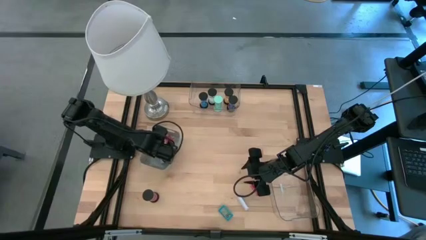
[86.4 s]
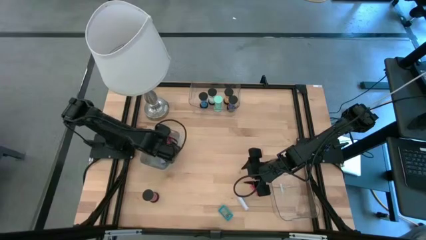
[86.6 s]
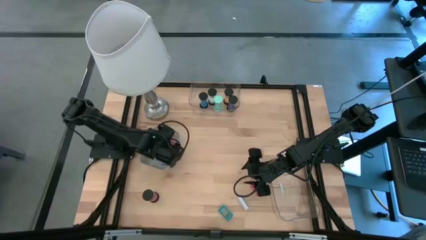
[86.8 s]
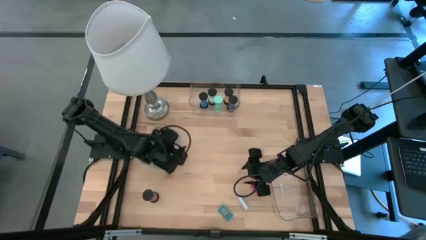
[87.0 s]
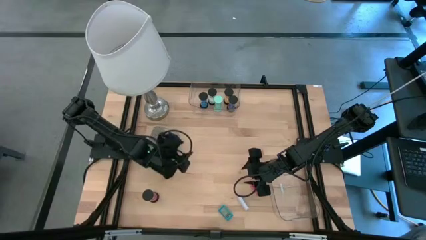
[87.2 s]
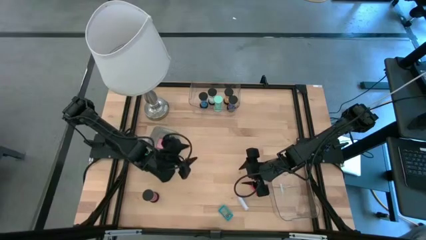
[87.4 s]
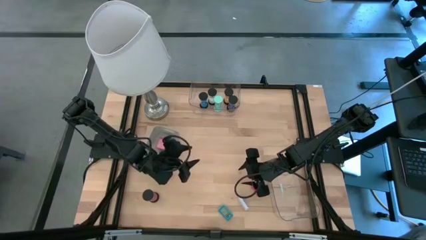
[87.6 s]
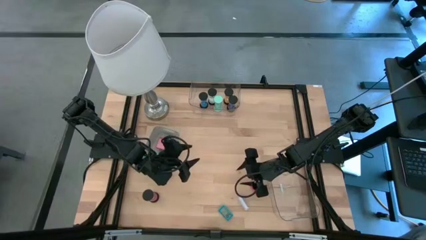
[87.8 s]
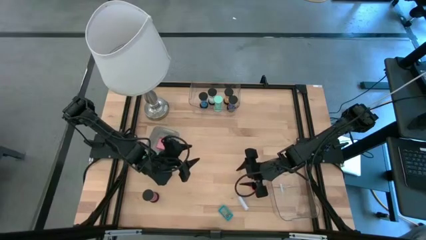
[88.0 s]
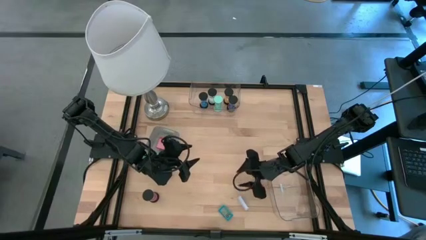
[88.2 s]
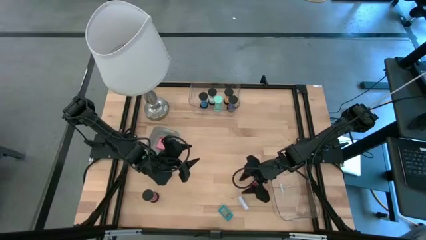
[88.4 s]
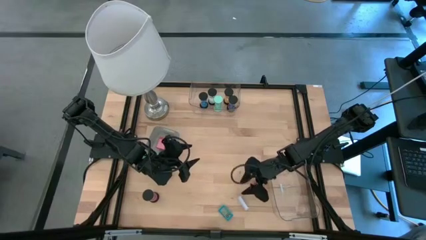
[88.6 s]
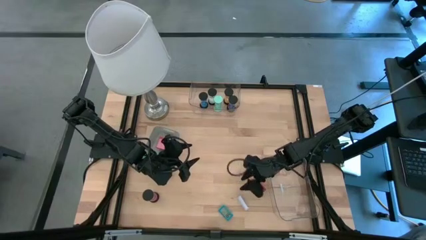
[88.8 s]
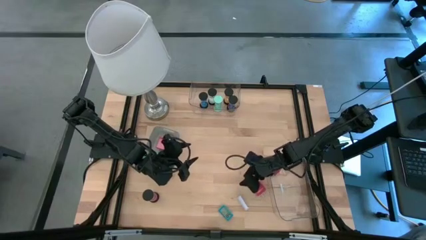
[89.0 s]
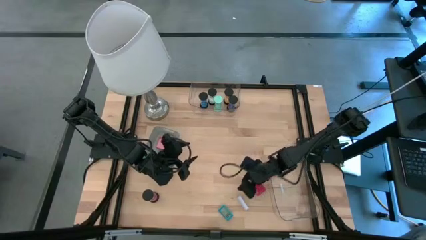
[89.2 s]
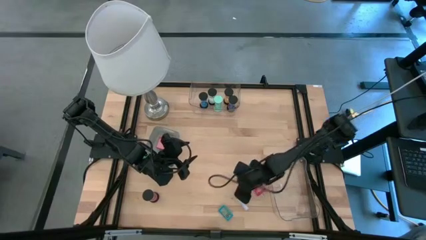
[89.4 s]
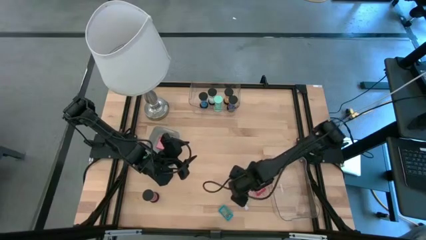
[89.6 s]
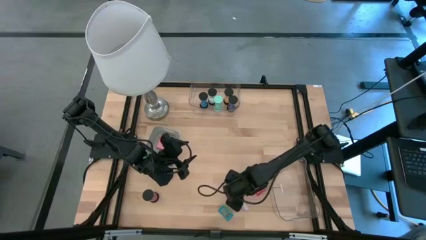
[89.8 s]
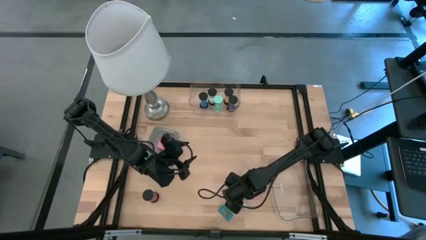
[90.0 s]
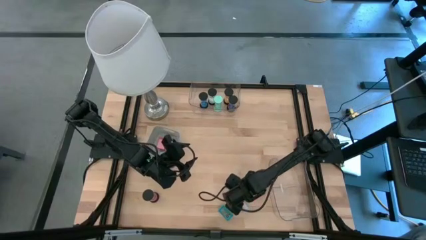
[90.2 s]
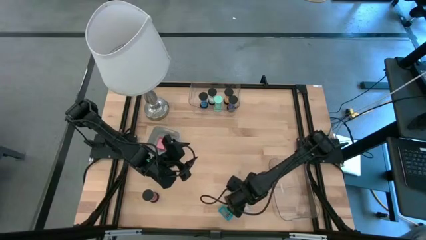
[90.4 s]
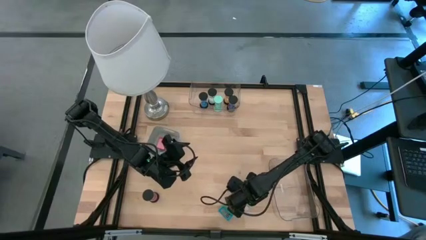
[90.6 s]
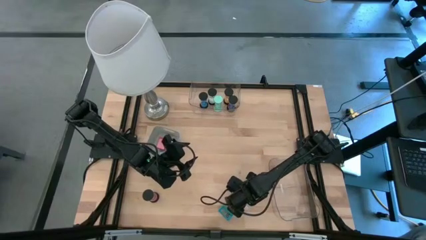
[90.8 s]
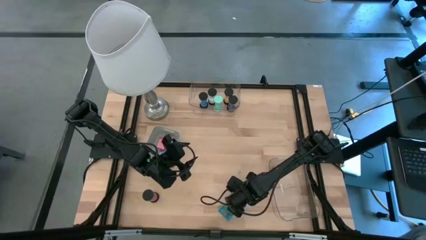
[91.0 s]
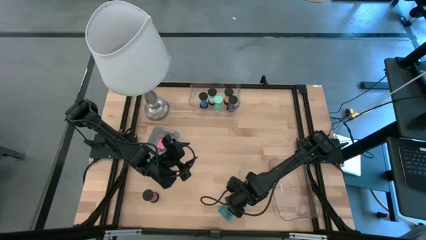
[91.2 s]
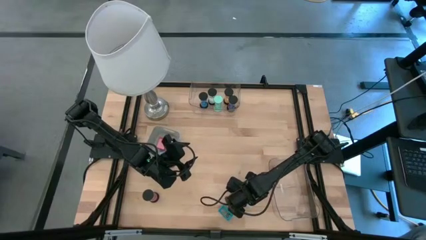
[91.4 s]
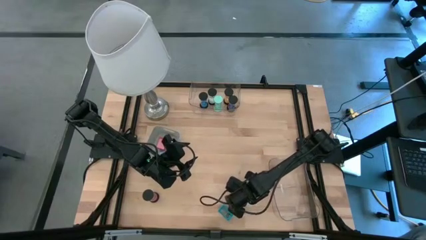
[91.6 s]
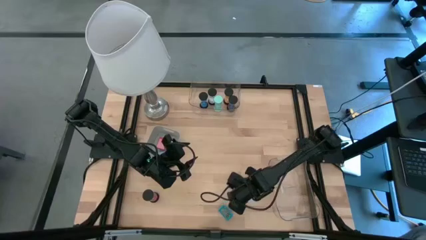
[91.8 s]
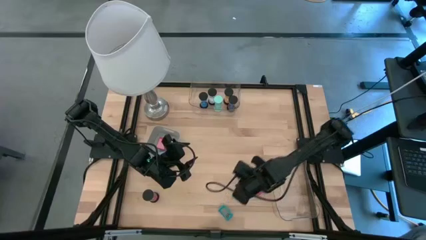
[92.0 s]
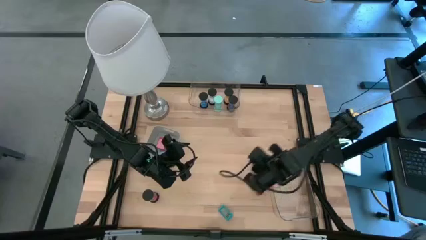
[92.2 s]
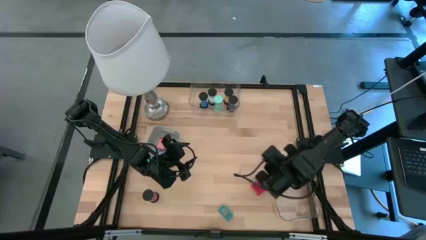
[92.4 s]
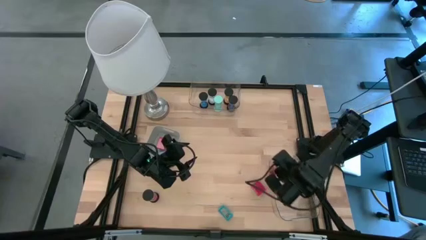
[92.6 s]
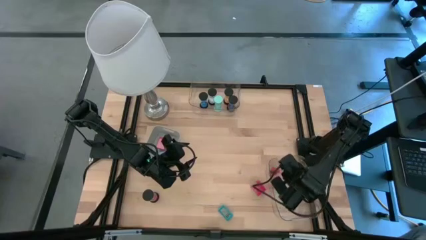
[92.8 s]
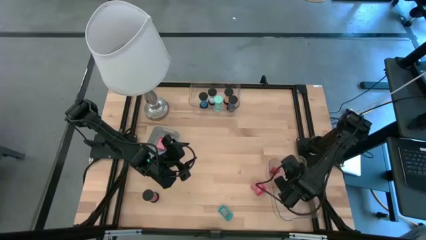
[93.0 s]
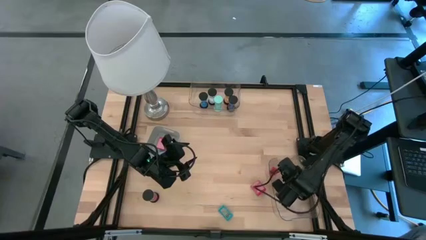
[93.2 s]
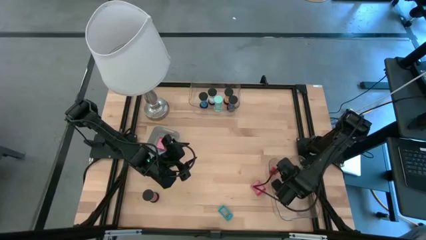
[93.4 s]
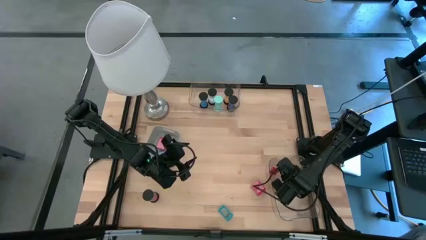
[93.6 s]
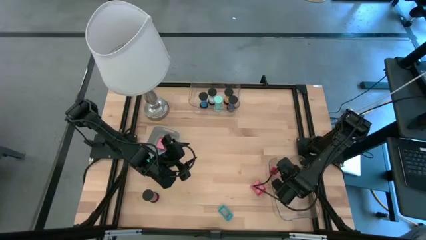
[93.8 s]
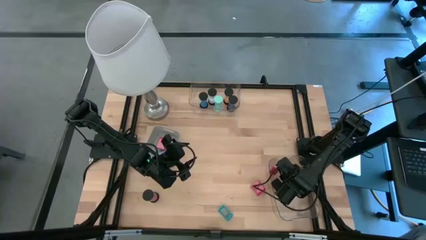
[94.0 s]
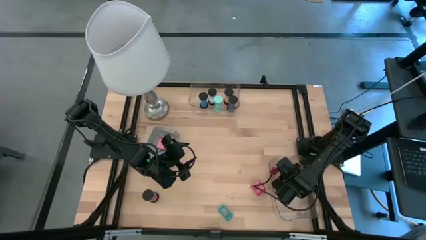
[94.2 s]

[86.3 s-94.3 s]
Task: Pick & Place Office items
Put the white digital timer into the bottom transparent bin

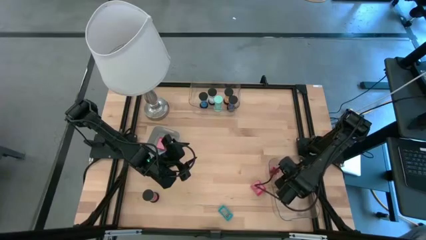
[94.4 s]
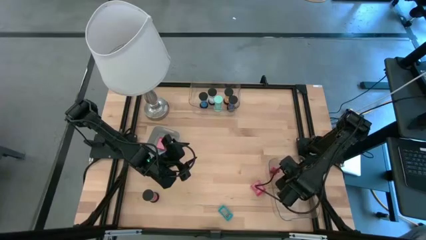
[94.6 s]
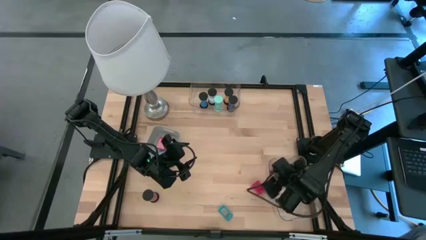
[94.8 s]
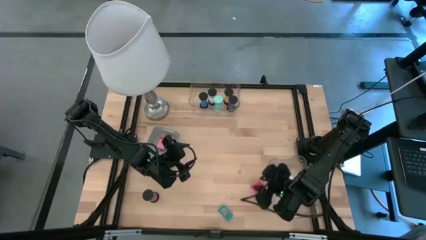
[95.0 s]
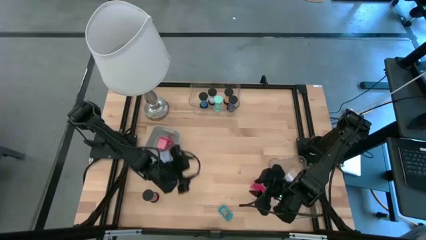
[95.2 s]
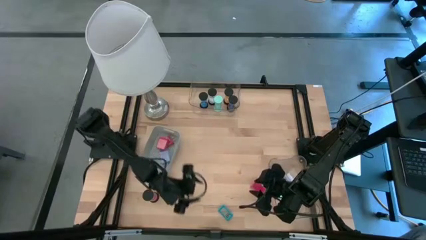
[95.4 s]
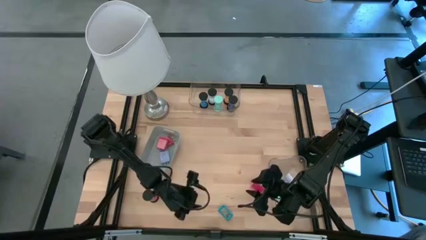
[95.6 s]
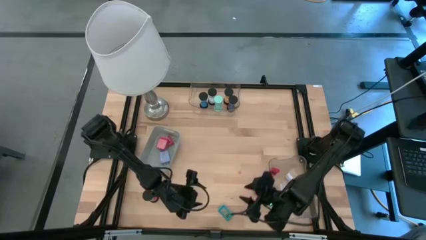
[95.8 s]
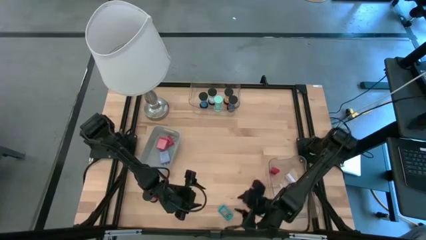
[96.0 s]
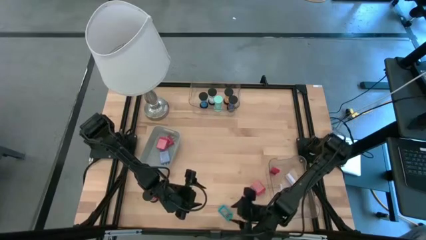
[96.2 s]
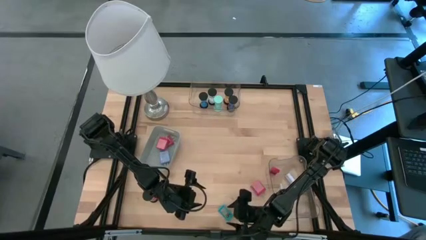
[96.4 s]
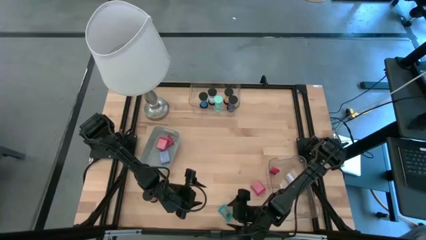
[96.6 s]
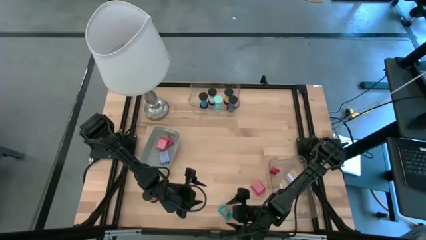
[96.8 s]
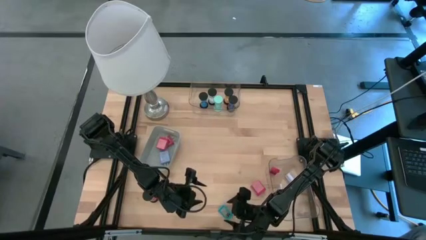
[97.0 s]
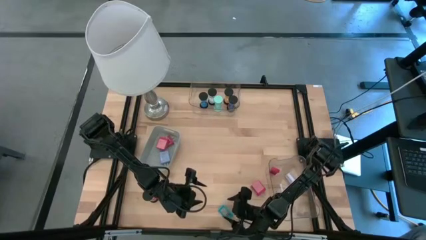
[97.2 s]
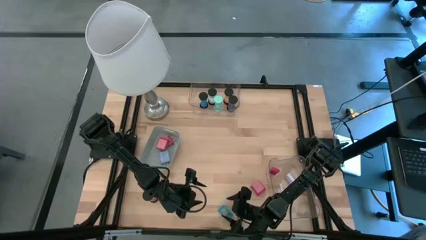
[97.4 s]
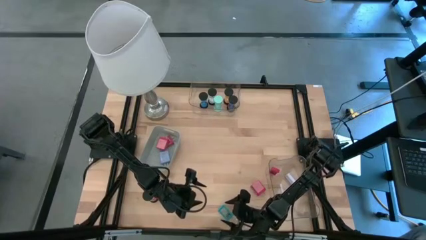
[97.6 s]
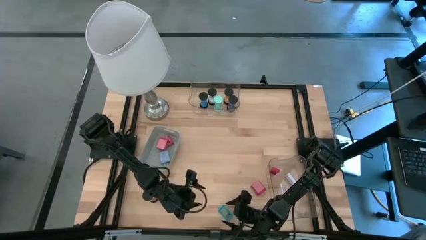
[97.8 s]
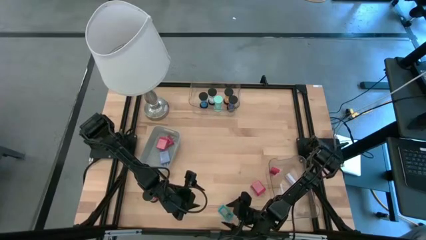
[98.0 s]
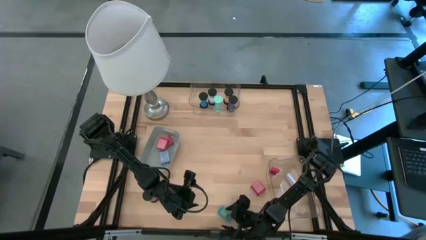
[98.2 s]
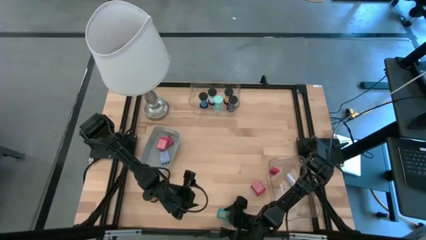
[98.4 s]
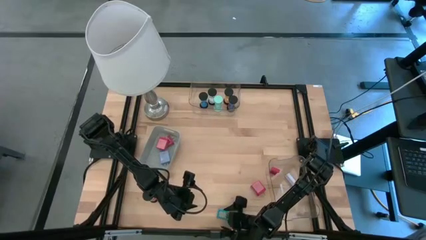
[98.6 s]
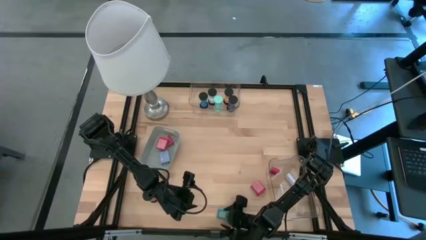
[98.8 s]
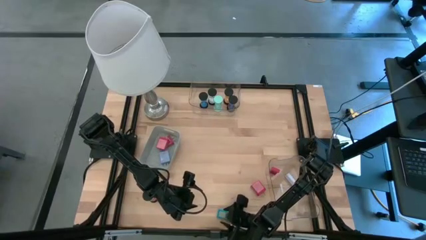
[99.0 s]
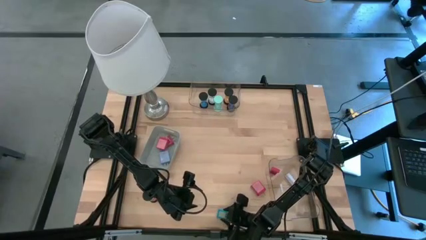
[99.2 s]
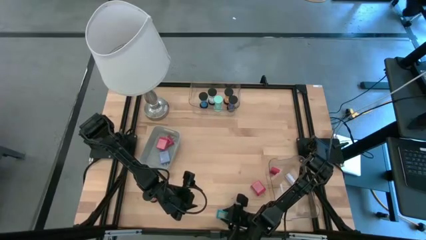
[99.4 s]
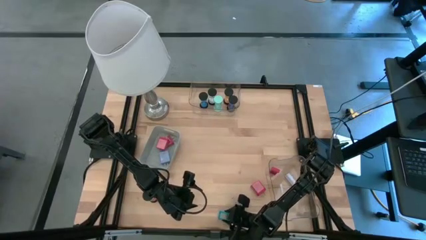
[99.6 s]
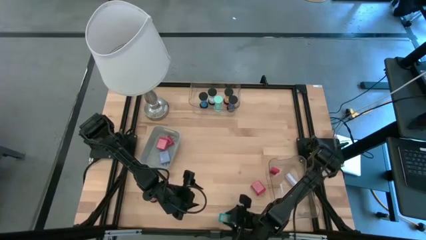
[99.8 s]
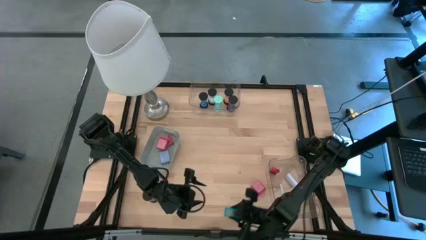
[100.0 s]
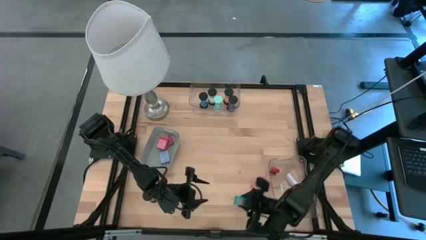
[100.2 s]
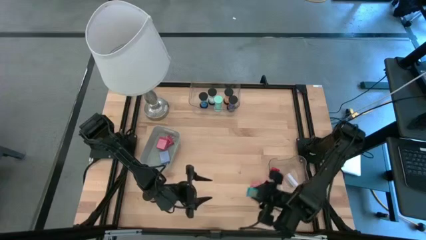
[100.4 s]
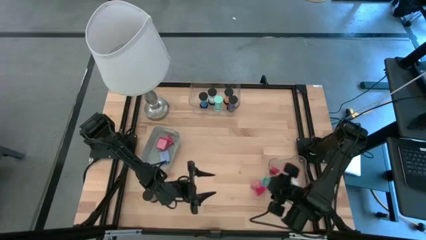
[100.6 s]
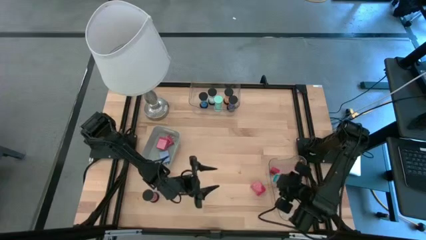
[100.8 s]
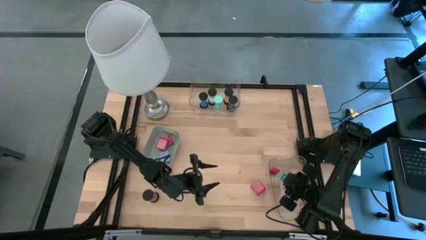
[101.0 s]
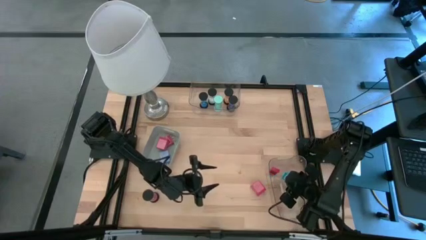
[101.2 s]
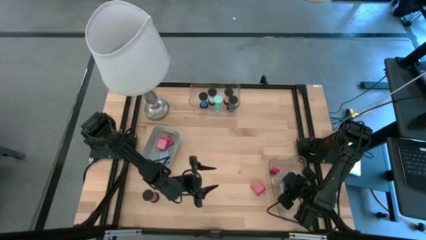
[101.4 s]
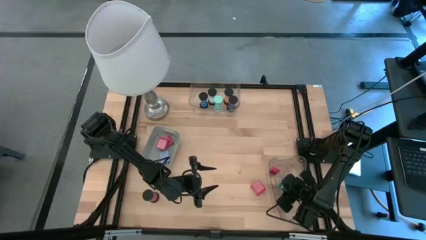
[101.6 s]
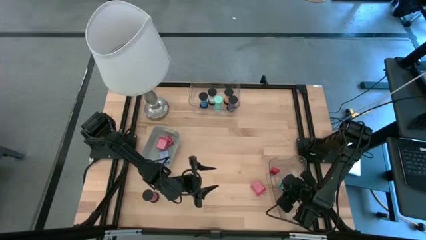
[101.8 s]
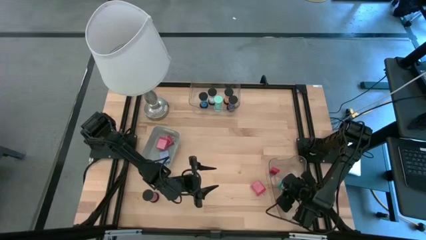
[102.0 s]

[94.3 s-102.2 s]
Put the blue digital timer into the bottom transparent bin

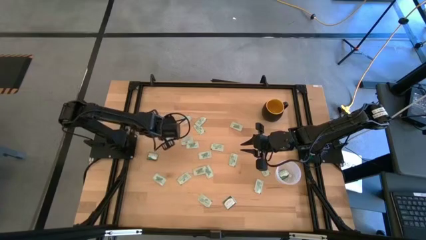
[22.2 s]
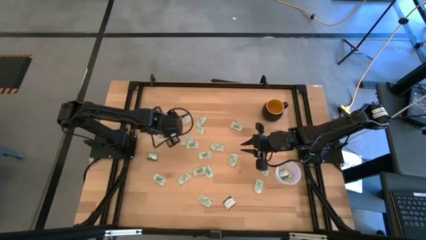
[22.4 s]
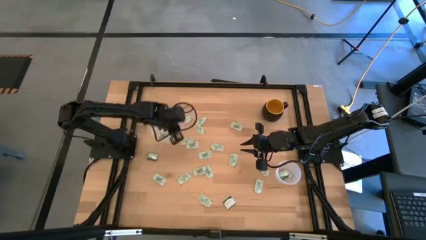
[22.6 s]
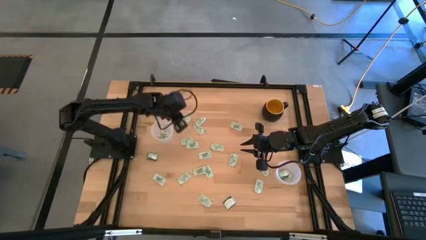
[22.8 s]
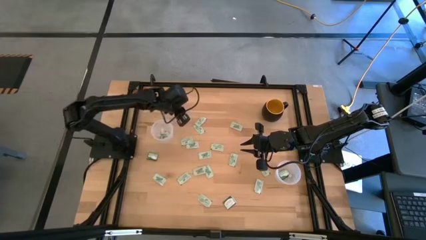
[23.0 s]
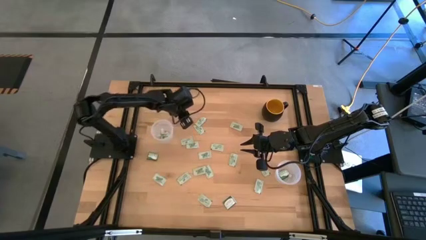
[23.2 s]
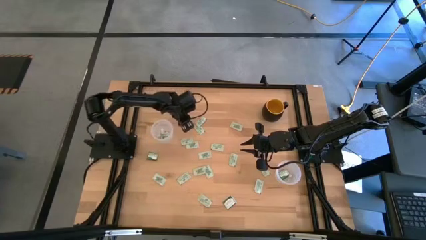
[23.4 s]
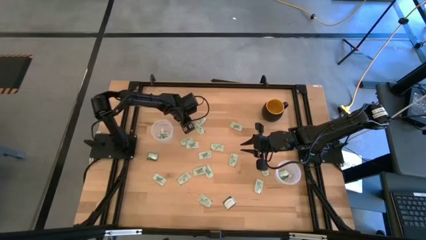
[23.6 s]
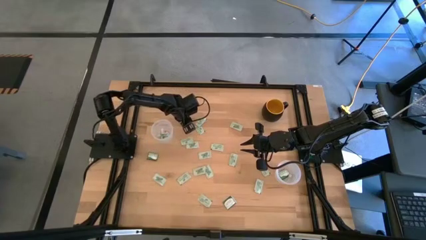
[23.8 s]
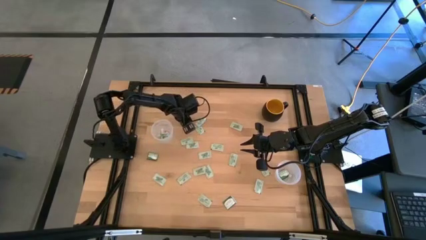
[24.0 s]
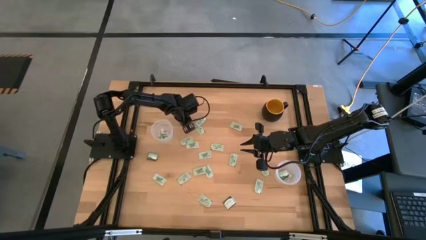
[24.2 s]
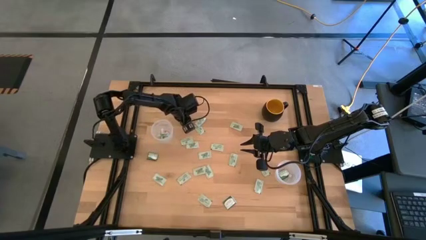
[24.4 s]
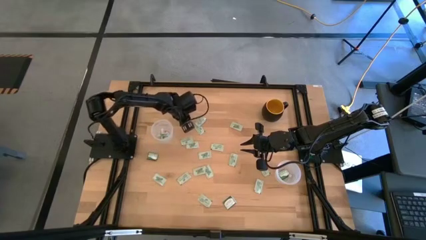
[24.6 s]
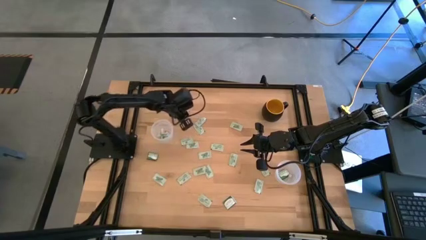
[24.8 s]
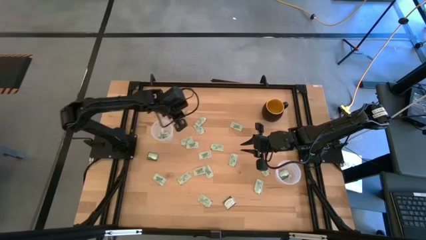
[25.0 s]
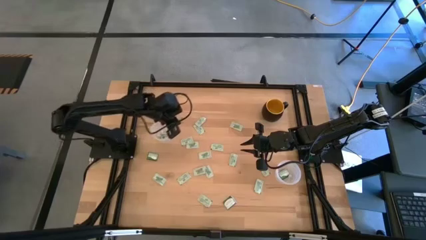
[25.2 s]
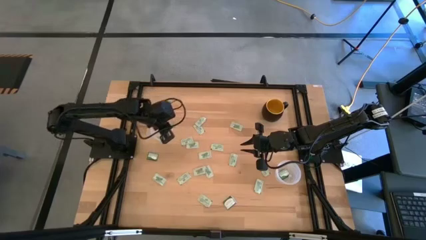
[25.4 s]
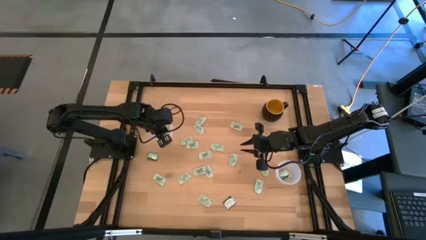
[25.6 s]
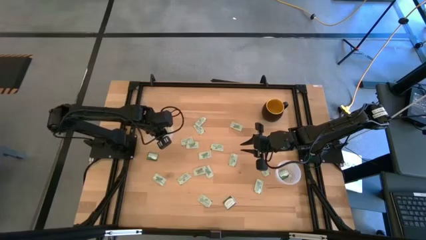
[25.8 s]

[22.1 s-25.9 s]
Task: Pick and place Stevia / Truvia into bins
Put the white stevia packet into the left transparent container
